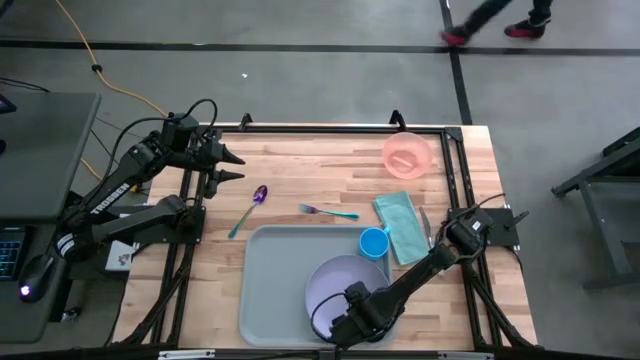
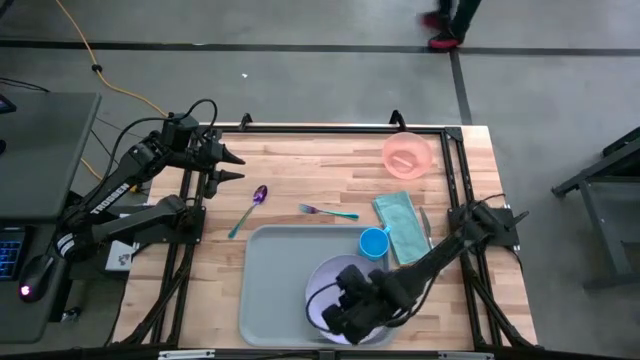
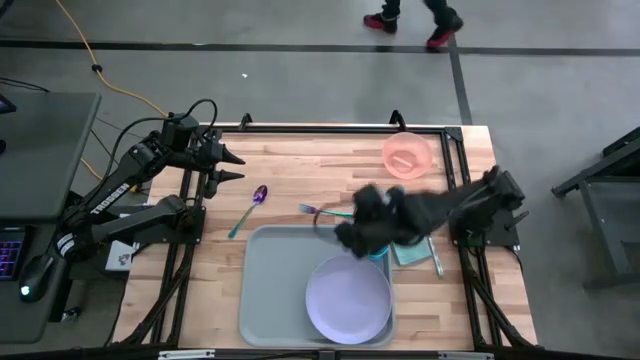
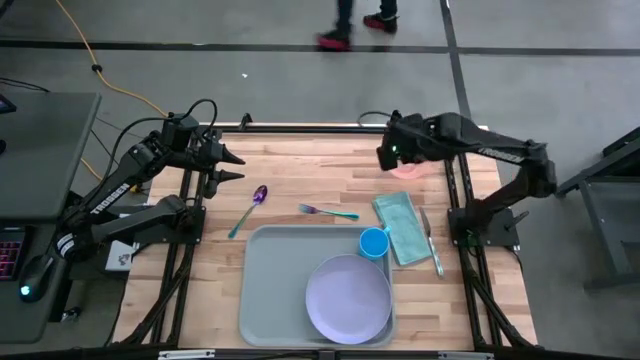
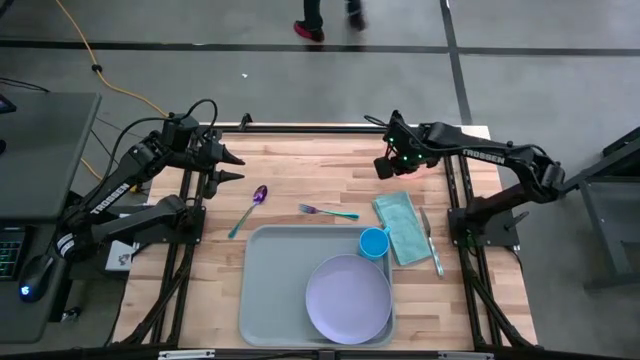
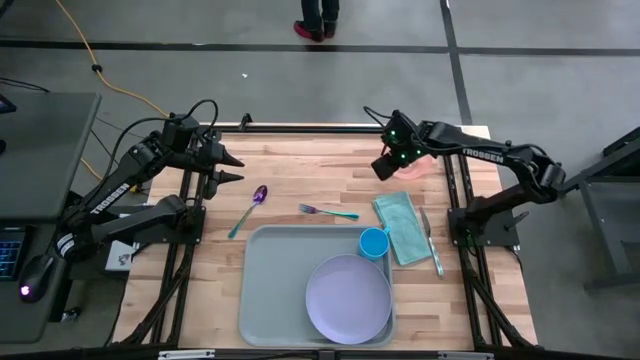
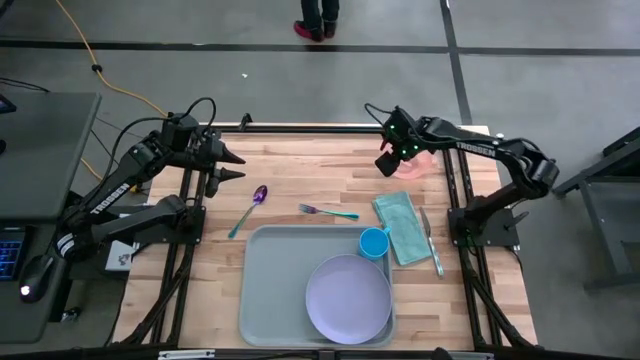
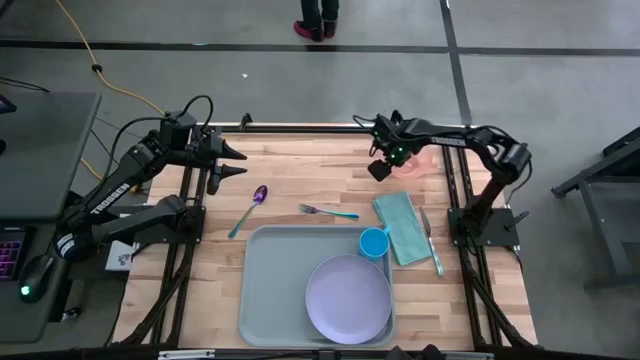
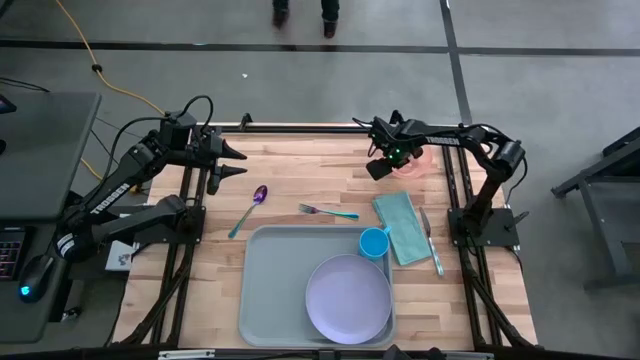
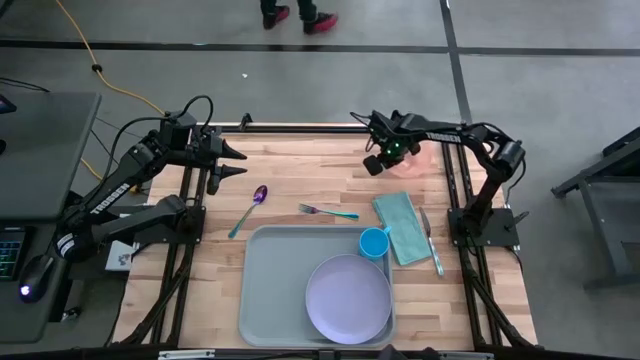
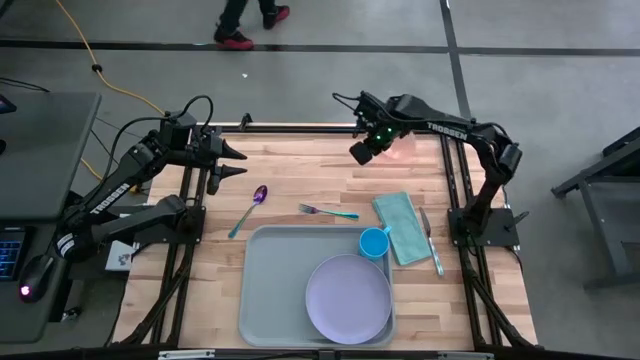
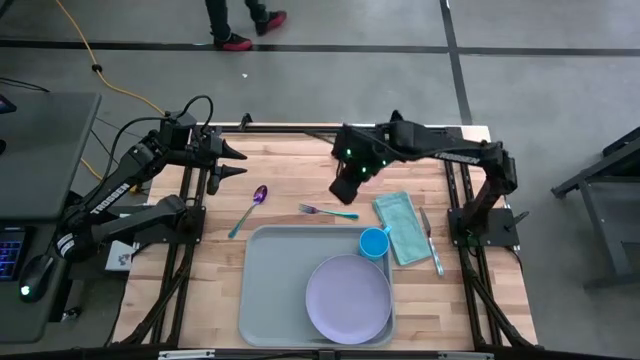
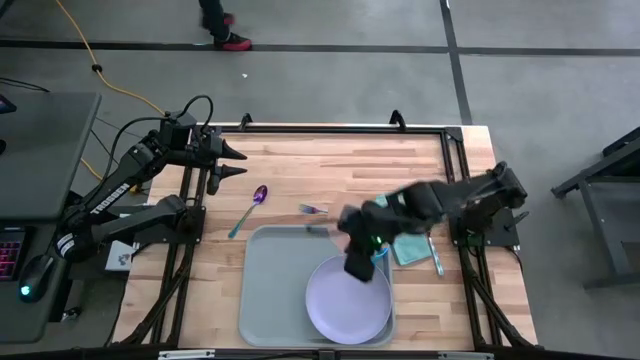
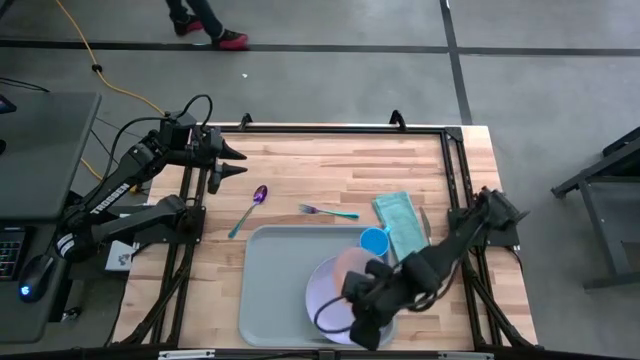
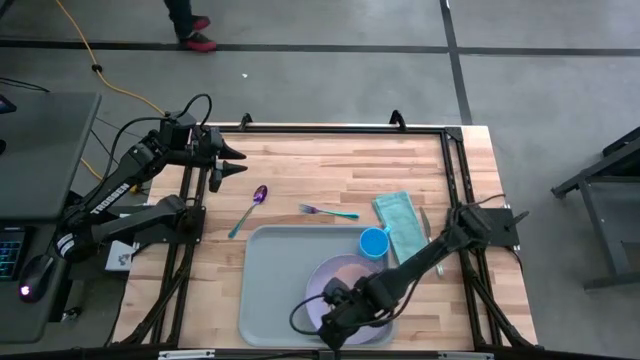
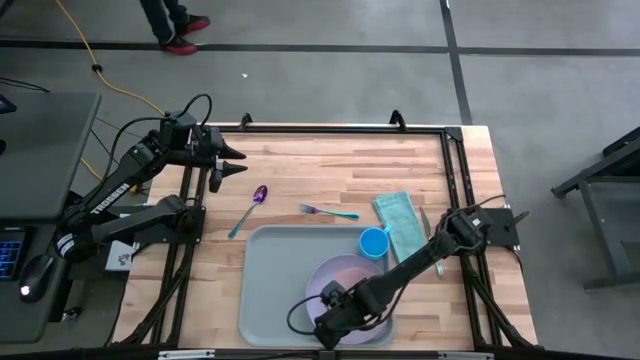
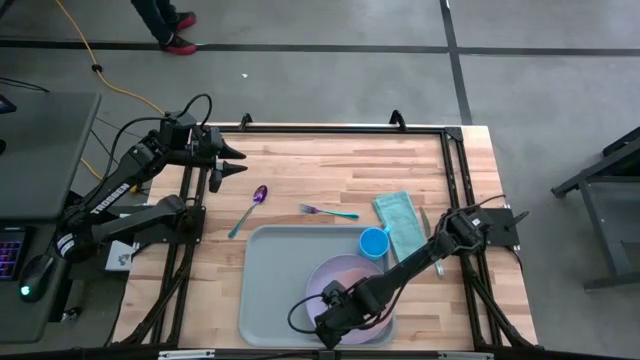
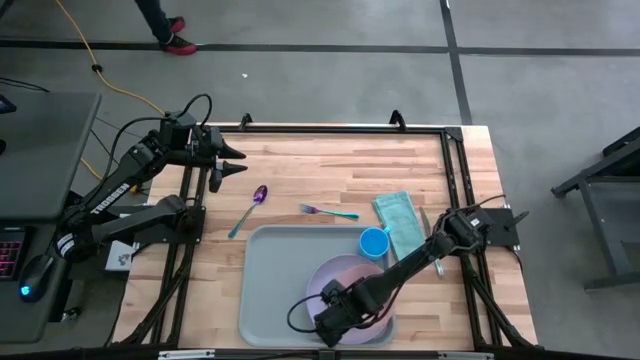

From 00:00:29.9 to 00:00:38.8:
Task: Set up tray
Put the light orange bowl on the violet plate

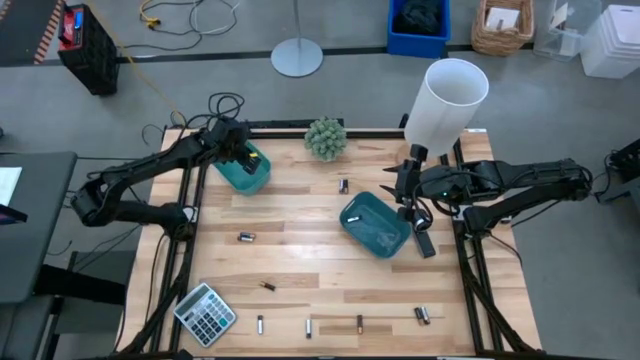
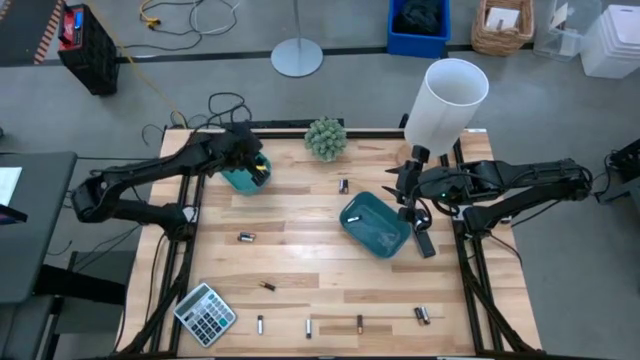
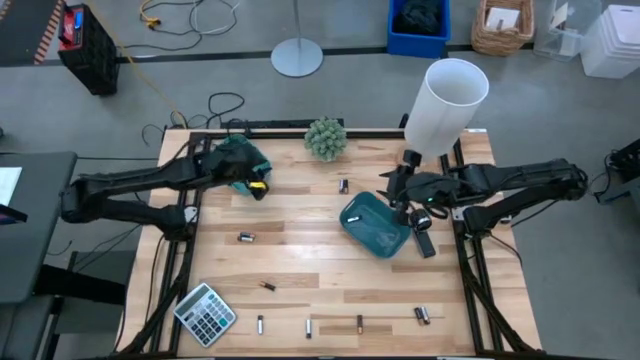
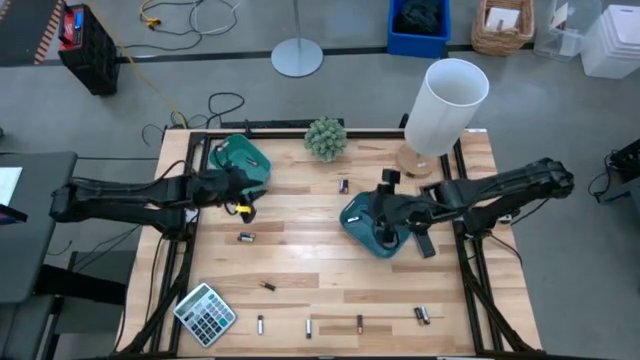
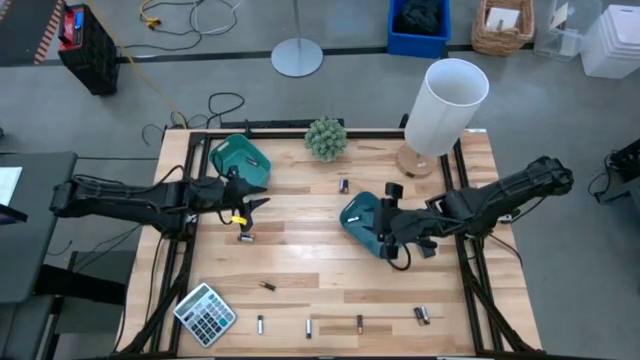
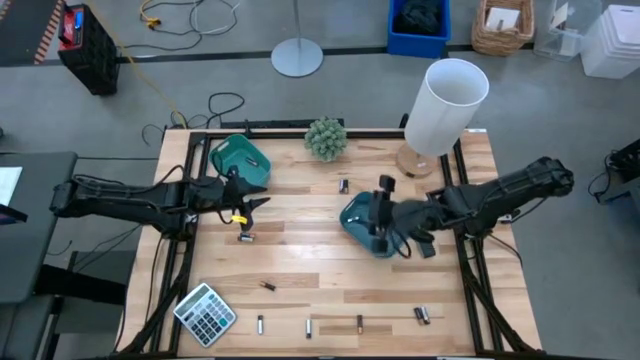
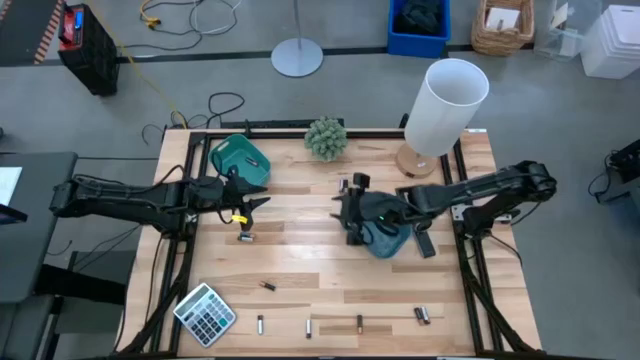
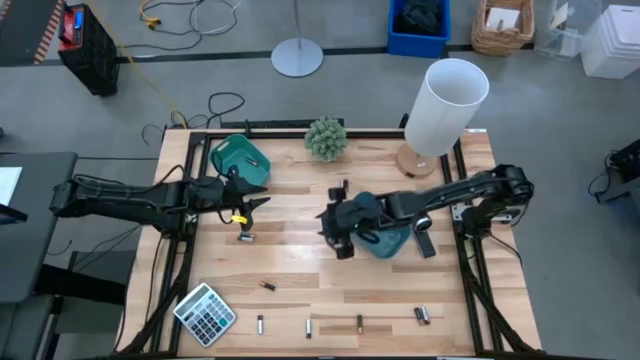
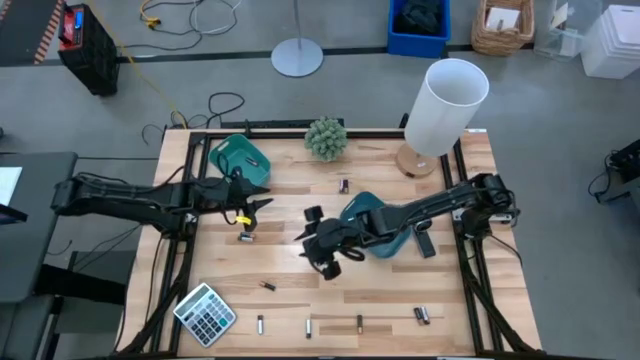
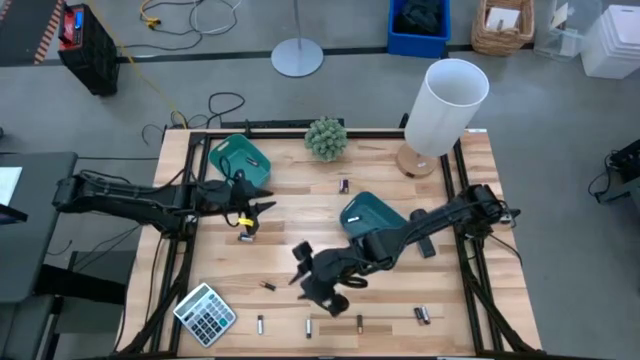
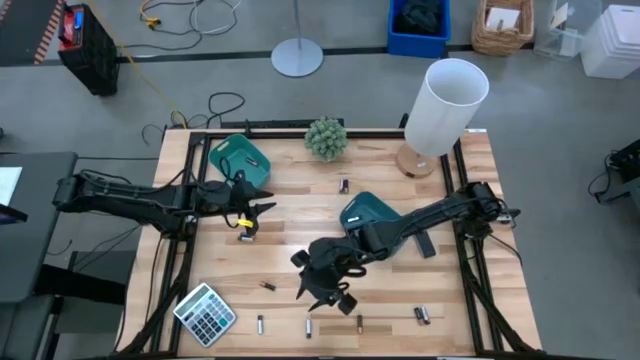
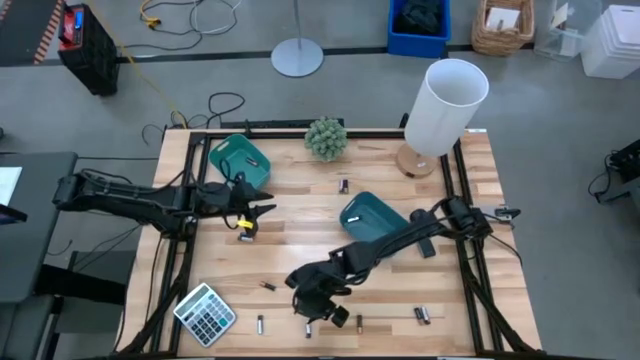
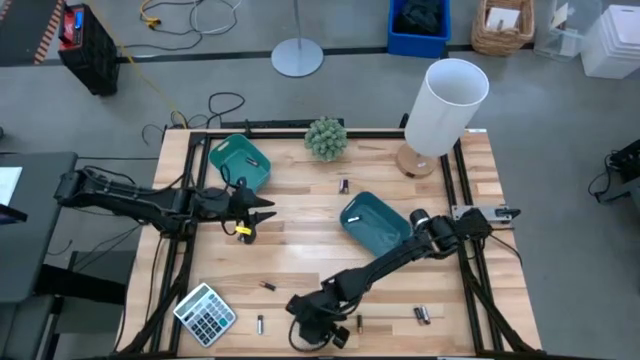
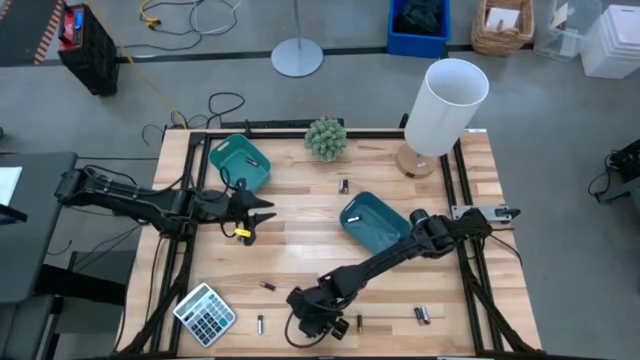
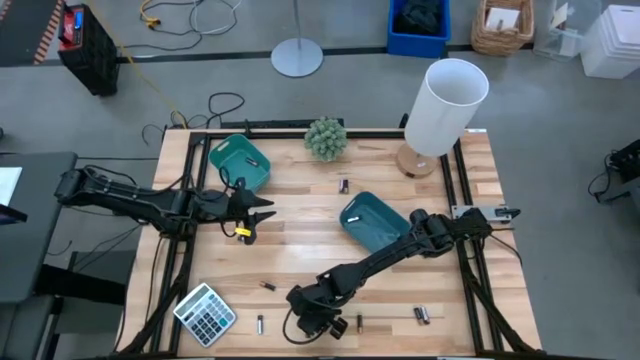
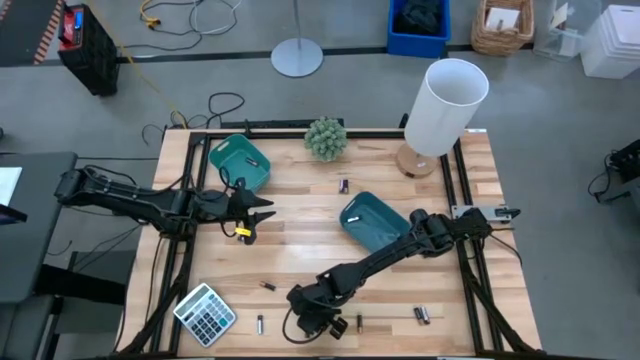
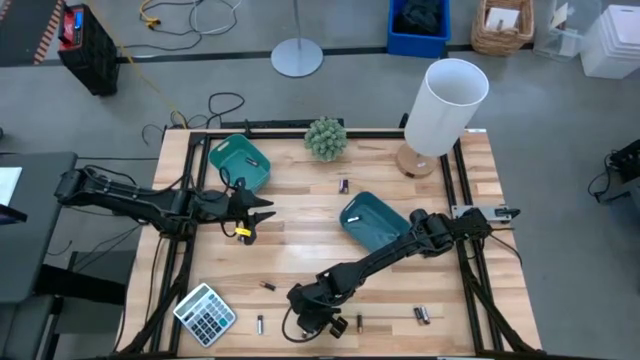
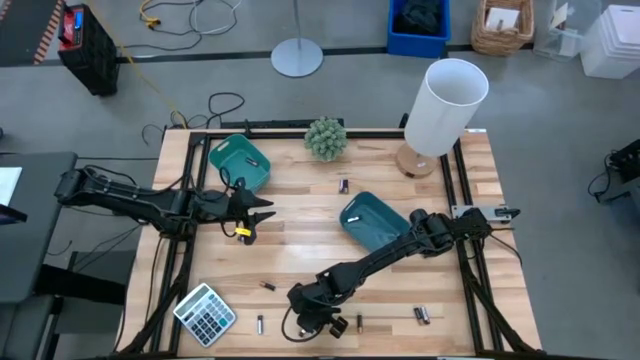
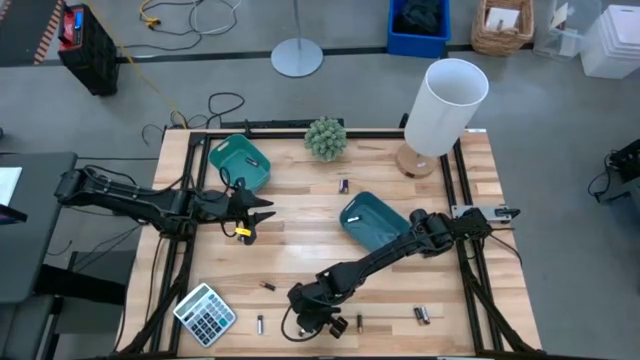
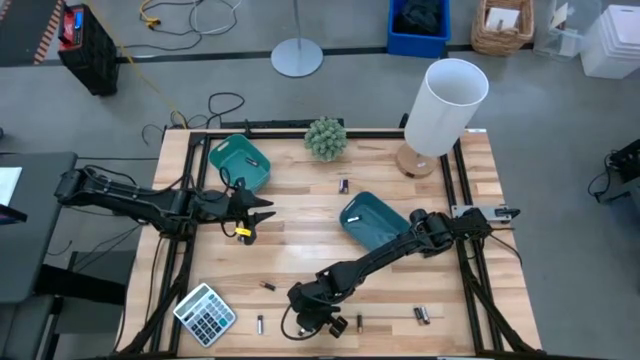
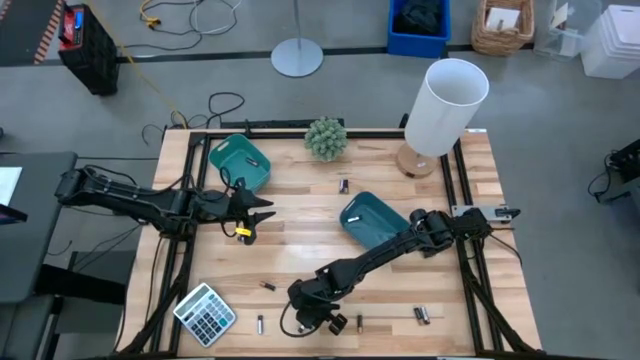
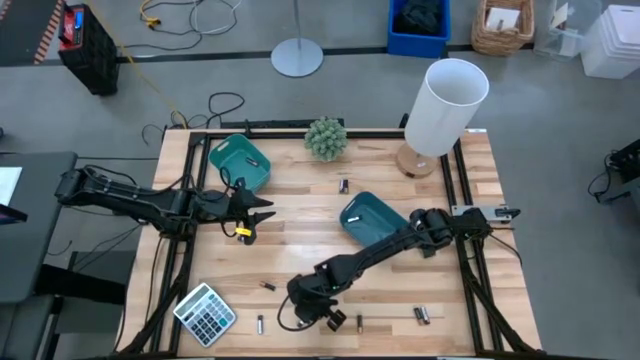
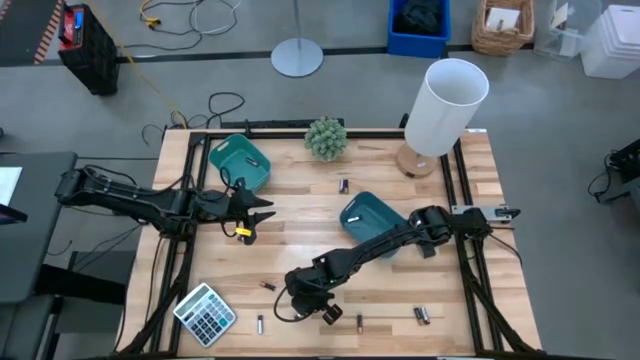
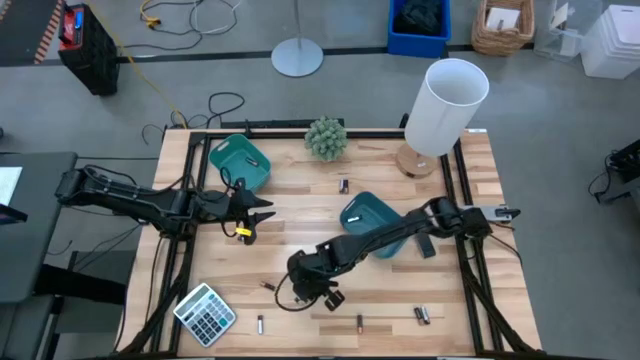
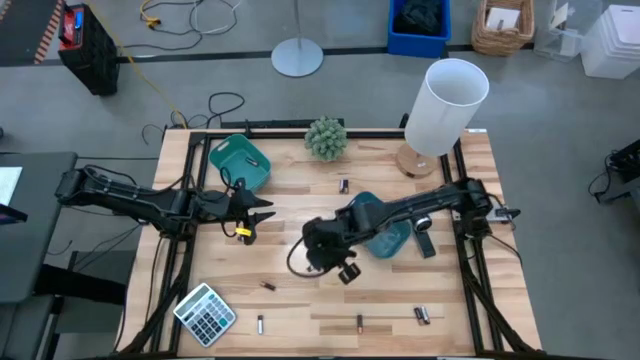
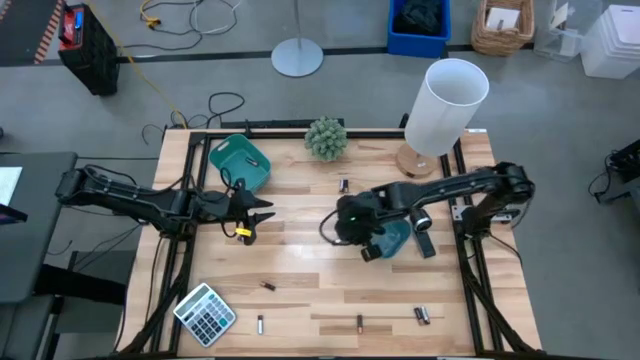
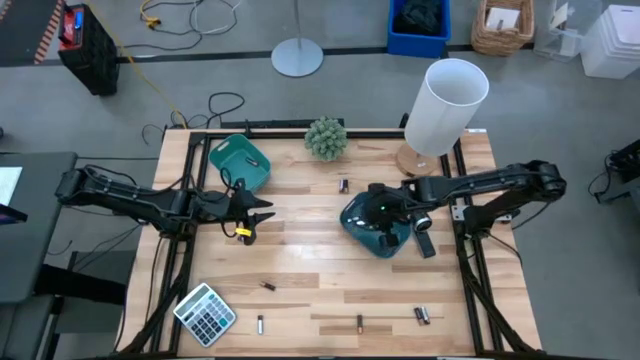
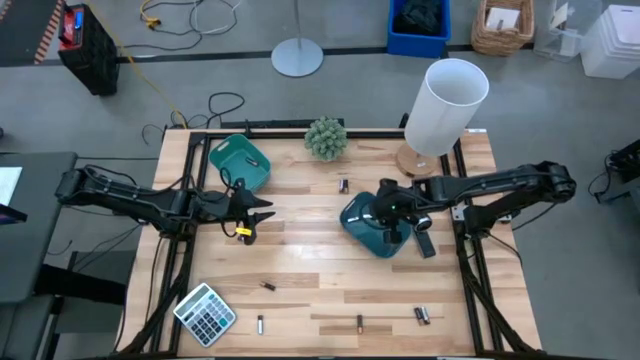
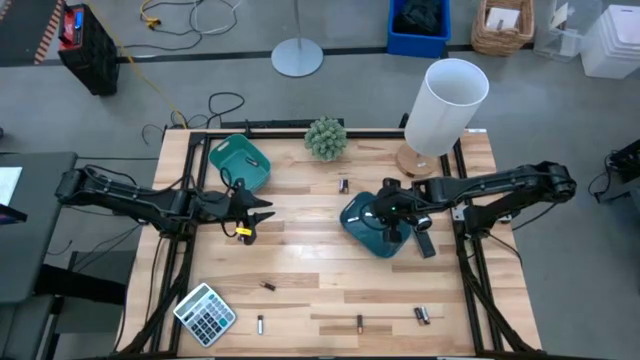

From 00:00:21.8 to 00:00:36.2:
Task: Sort batteries
Put the silver battery into the blue bin
